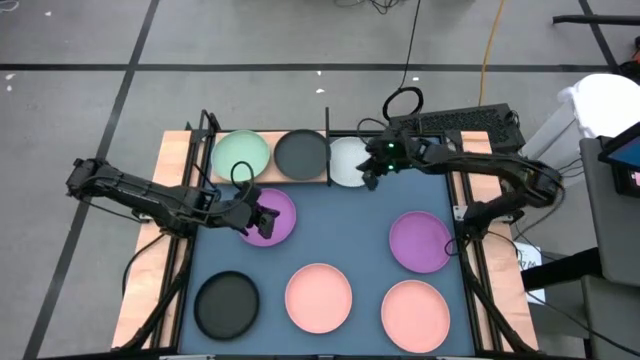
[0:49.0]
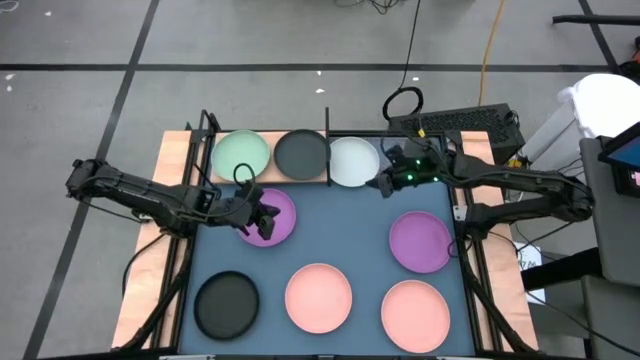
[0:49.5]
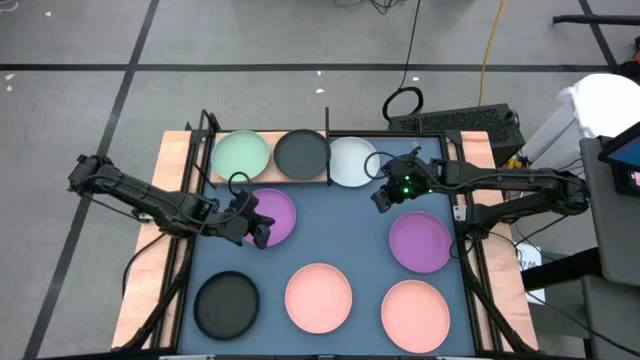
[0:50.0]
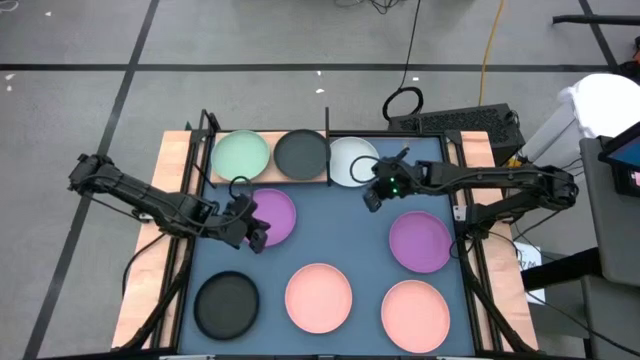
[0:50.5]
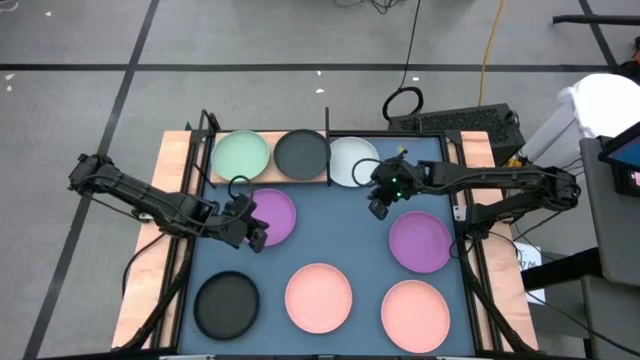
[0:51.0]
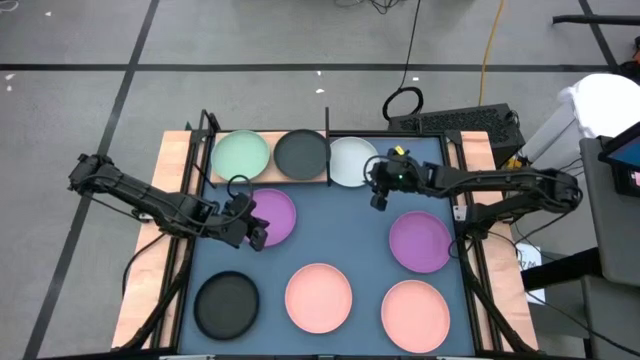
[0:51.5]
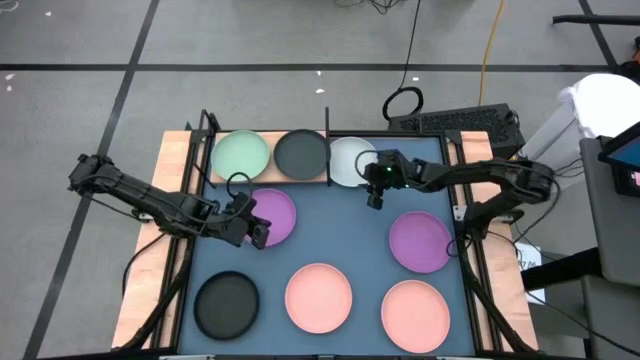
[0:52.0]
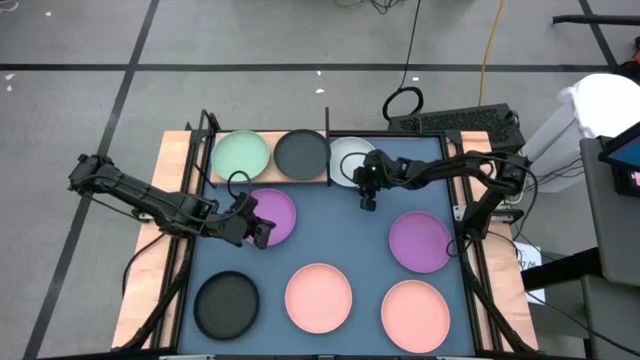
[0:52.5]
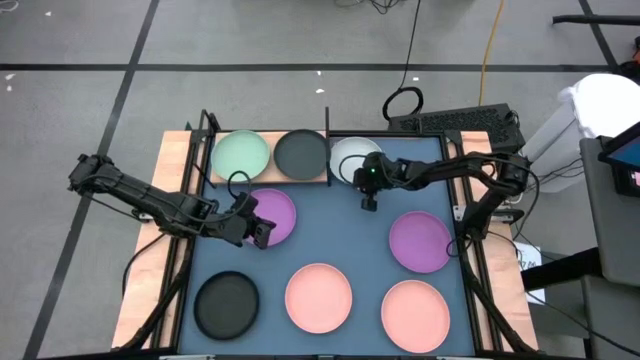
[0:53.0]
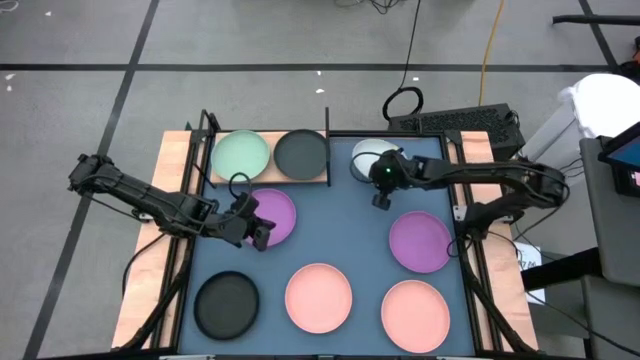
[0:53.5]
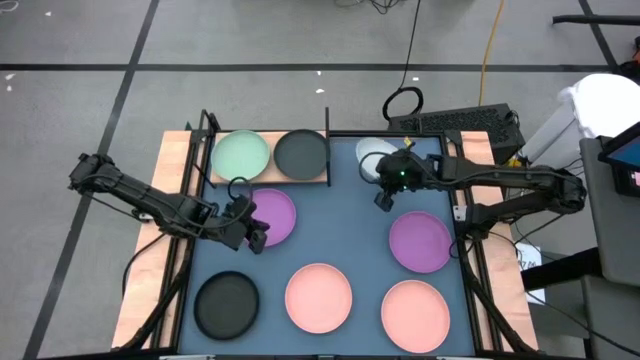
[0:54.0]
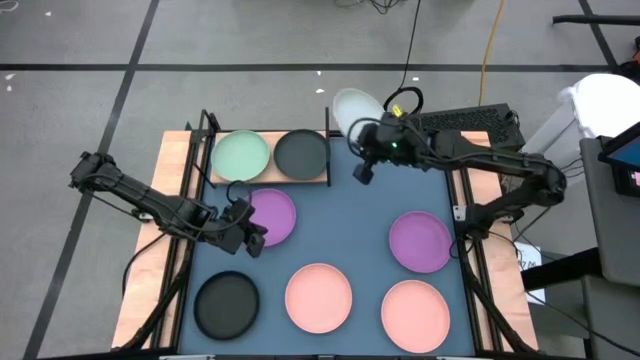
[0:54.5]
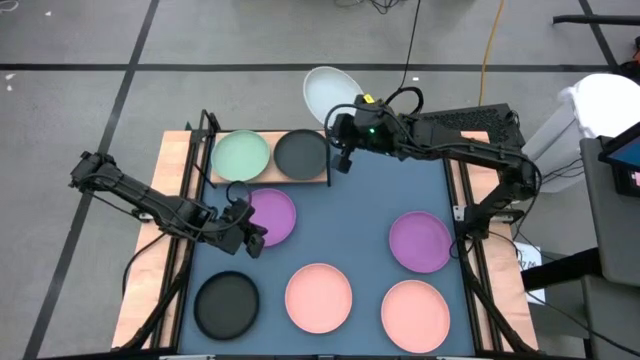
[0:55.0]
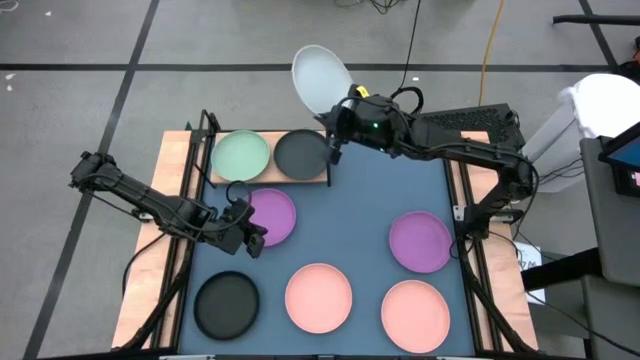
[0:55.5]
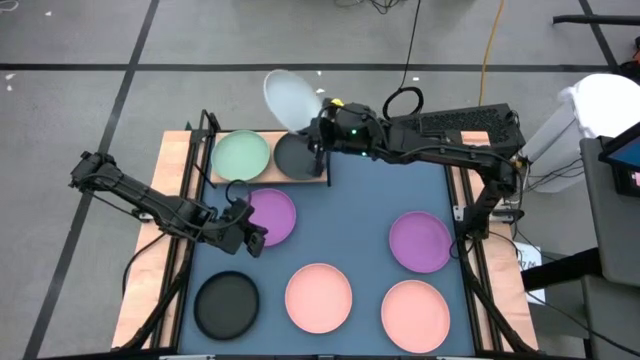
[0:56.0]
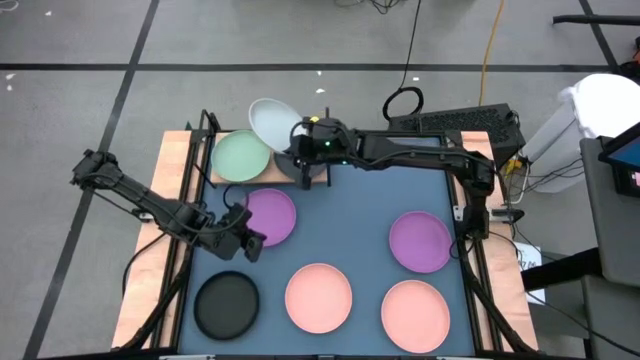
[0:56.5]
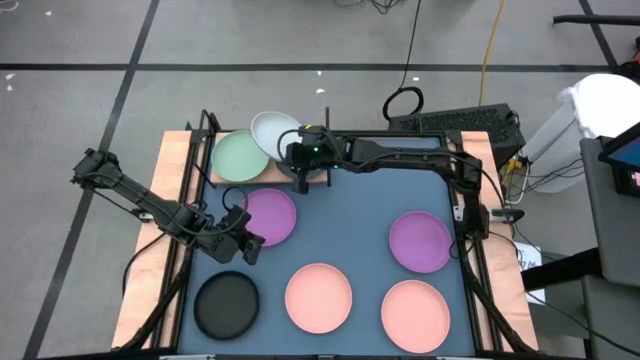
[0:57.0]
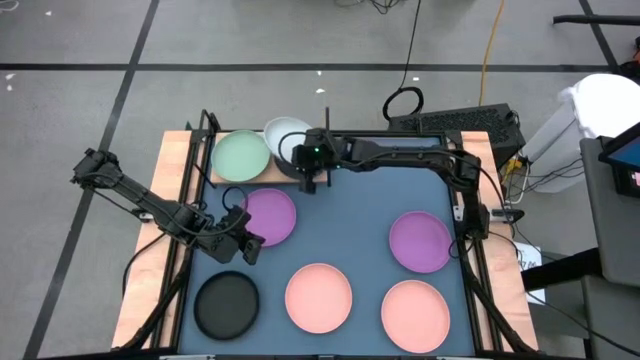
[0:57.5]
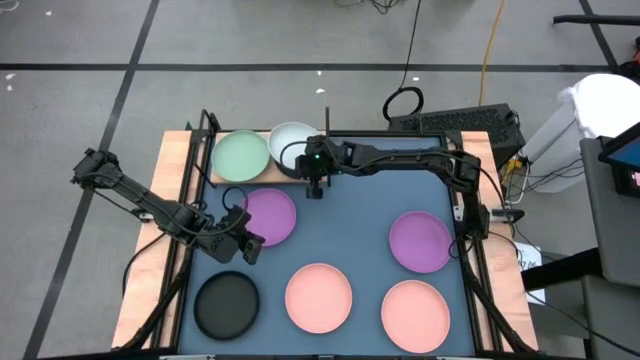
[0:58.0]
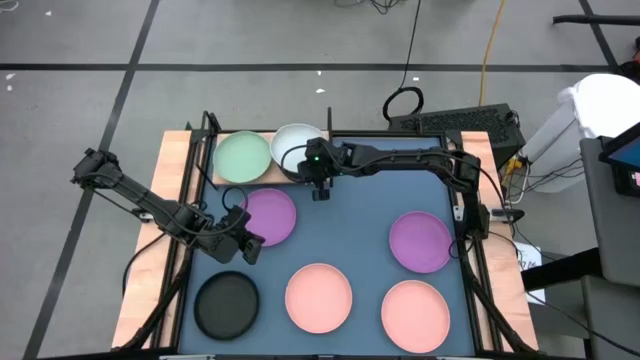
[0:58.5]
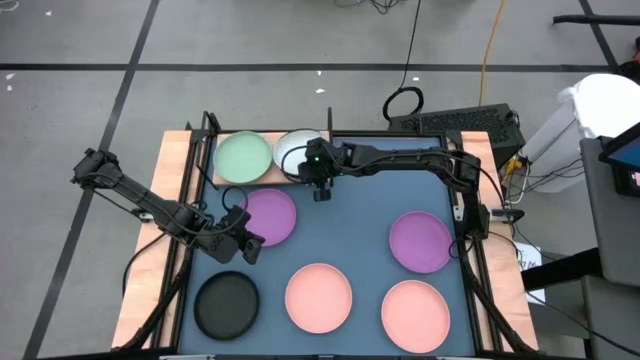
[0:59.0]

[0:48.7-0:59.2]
Task: Place and stack plates onto a shelf
Stack the light blue plate on top of the black plate on the shelf
